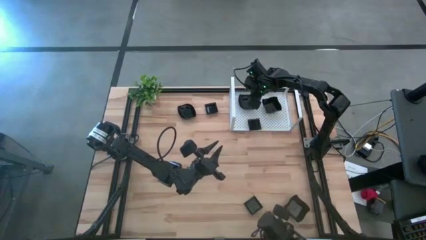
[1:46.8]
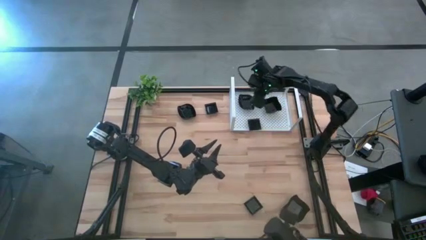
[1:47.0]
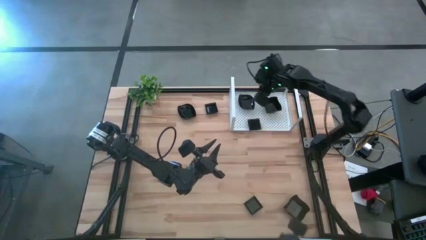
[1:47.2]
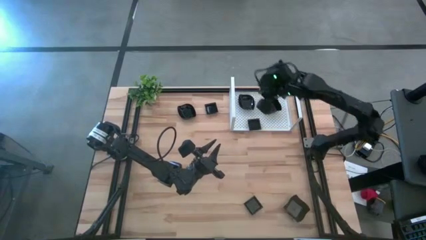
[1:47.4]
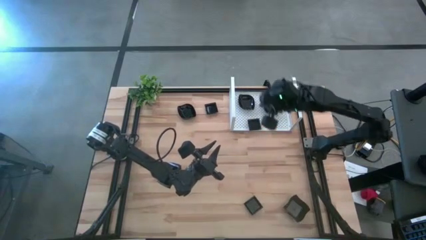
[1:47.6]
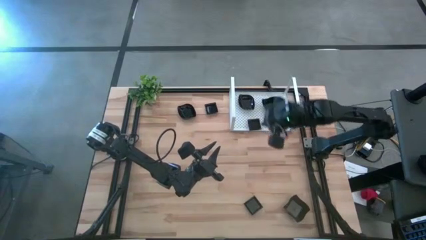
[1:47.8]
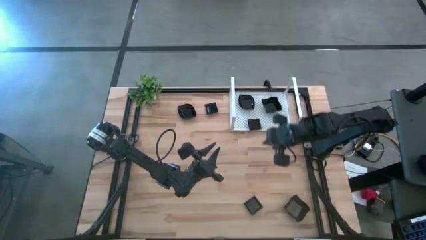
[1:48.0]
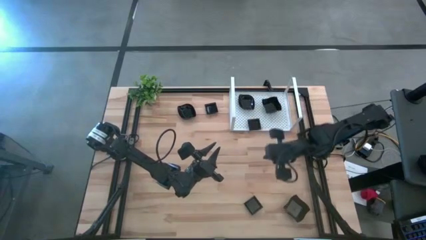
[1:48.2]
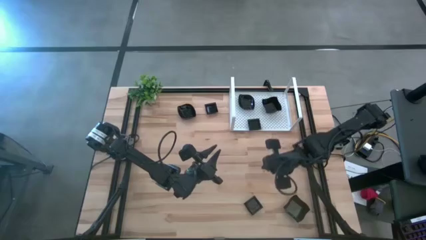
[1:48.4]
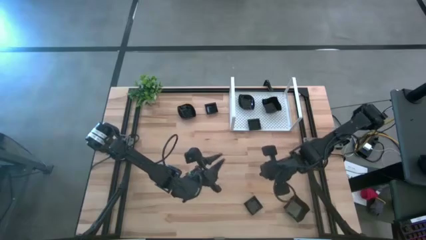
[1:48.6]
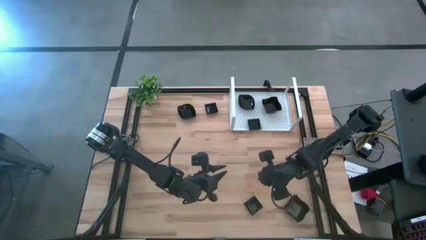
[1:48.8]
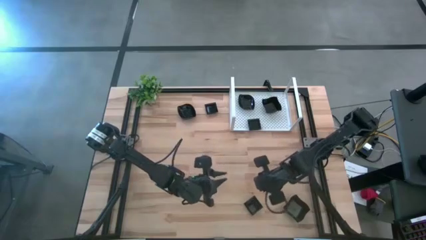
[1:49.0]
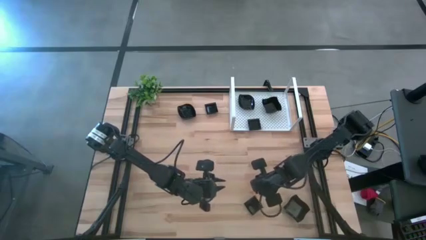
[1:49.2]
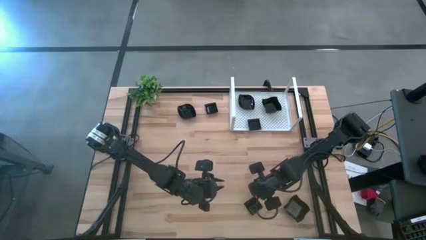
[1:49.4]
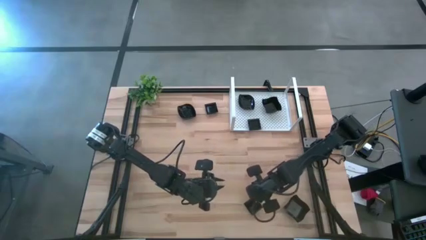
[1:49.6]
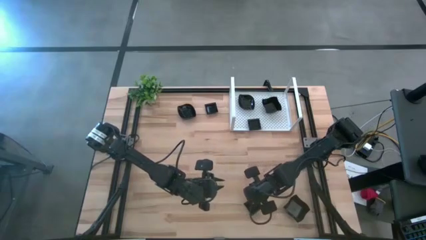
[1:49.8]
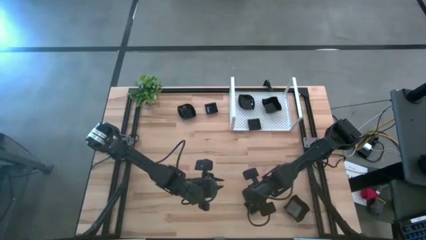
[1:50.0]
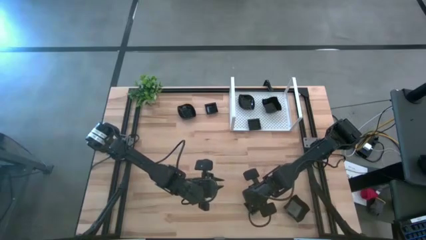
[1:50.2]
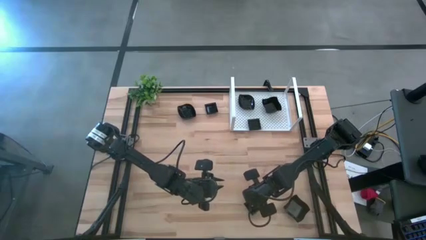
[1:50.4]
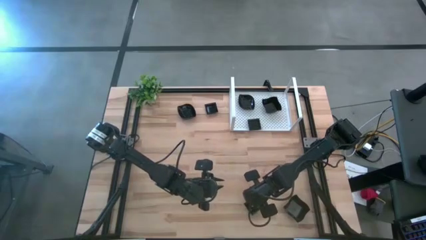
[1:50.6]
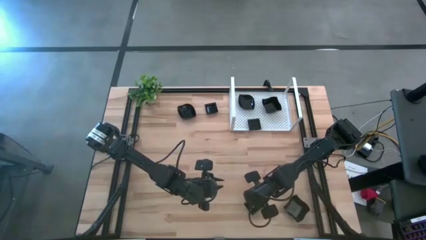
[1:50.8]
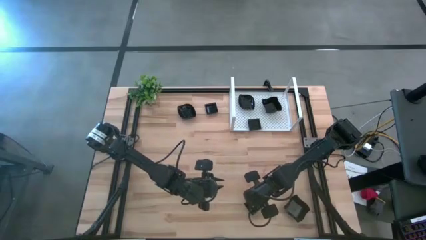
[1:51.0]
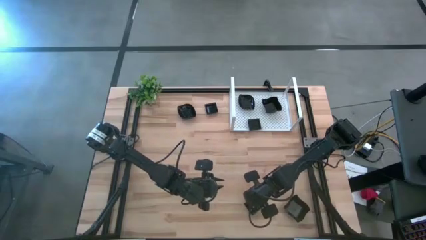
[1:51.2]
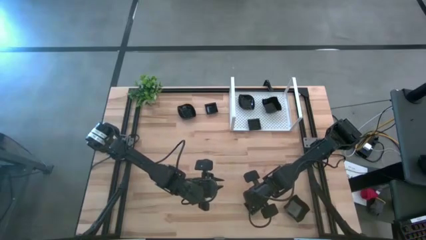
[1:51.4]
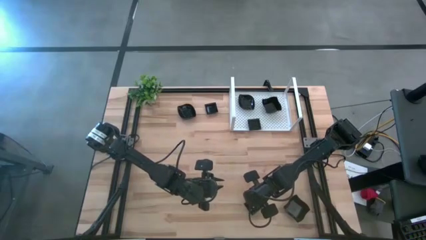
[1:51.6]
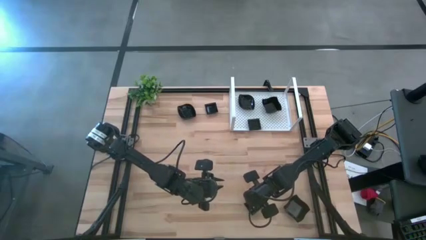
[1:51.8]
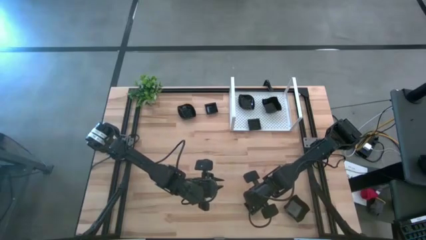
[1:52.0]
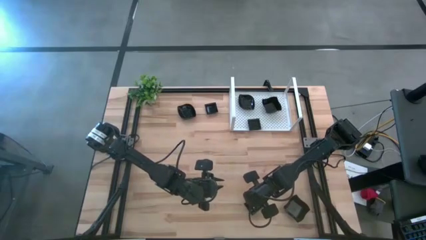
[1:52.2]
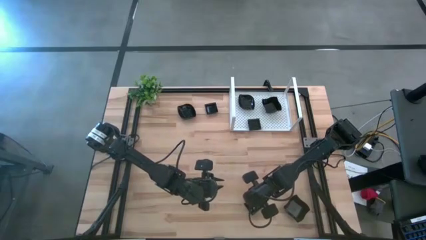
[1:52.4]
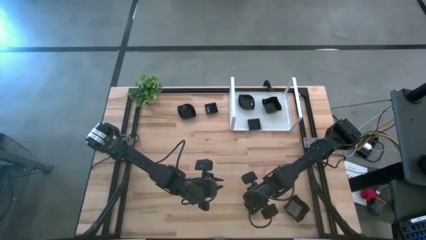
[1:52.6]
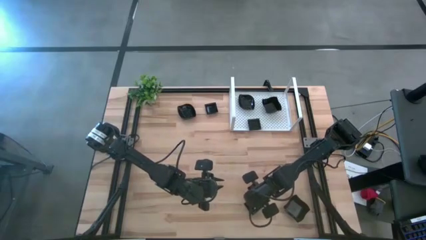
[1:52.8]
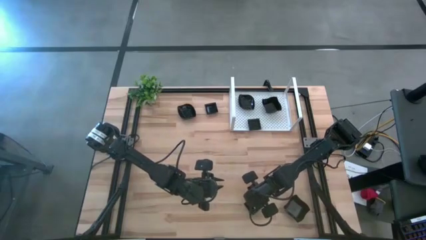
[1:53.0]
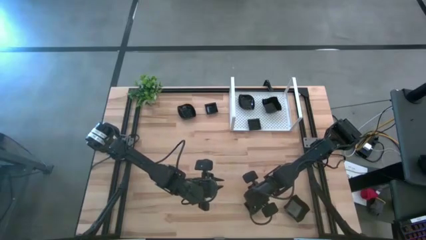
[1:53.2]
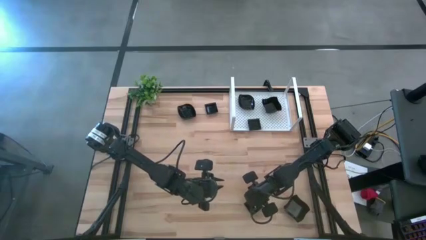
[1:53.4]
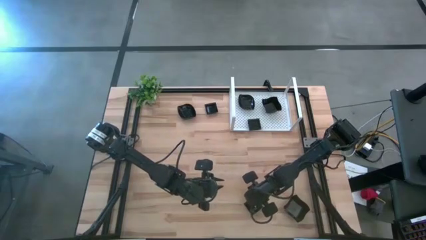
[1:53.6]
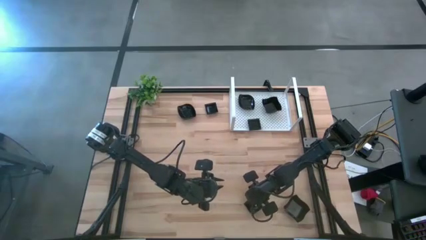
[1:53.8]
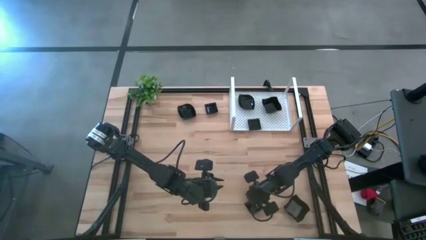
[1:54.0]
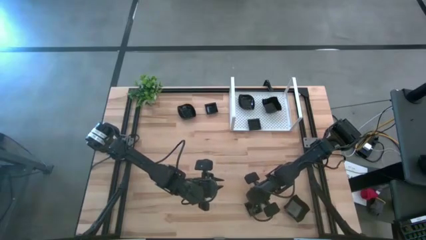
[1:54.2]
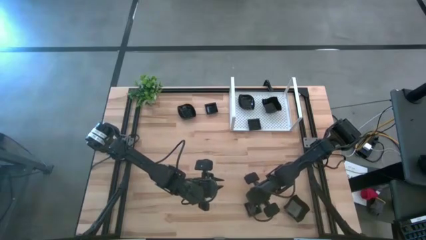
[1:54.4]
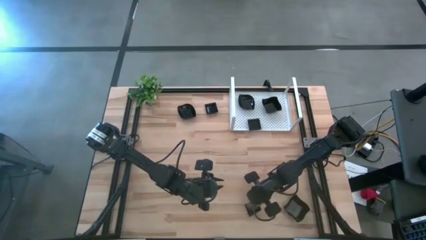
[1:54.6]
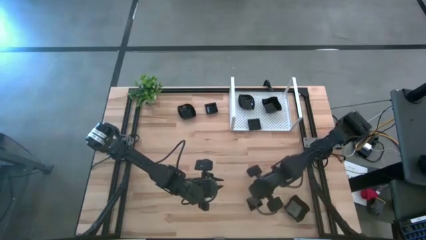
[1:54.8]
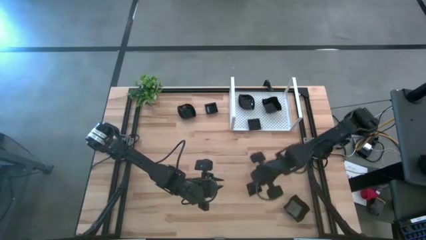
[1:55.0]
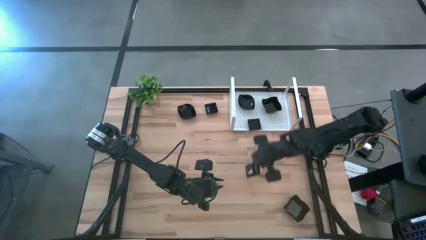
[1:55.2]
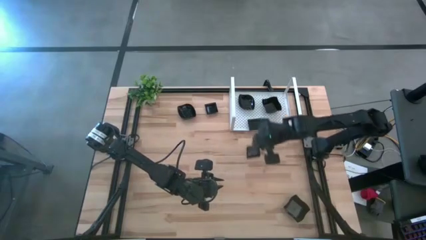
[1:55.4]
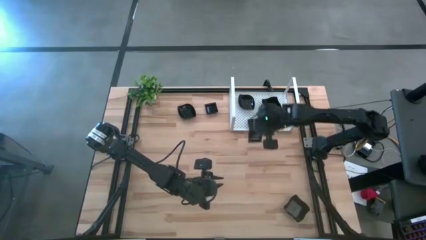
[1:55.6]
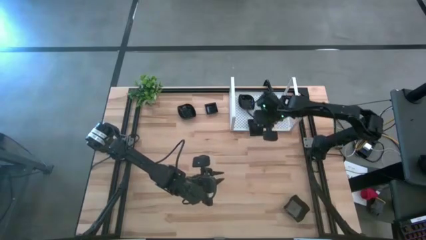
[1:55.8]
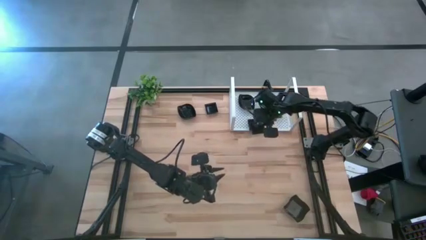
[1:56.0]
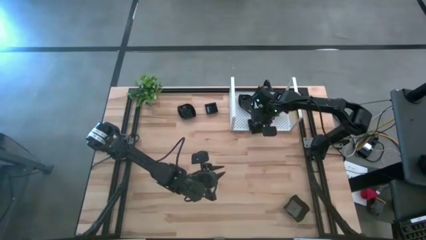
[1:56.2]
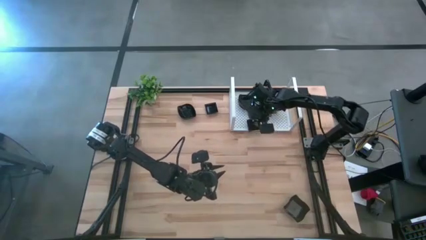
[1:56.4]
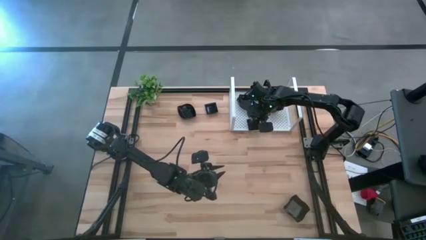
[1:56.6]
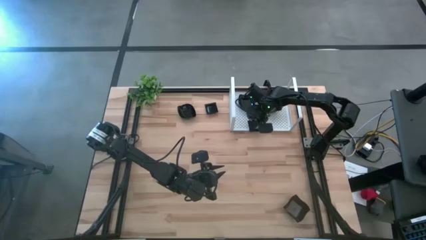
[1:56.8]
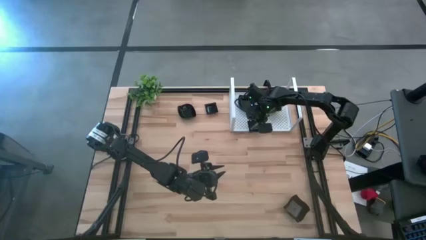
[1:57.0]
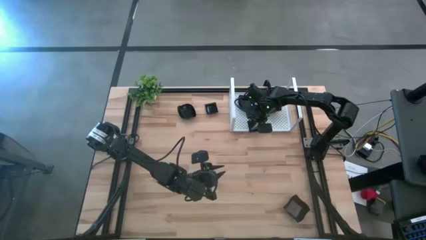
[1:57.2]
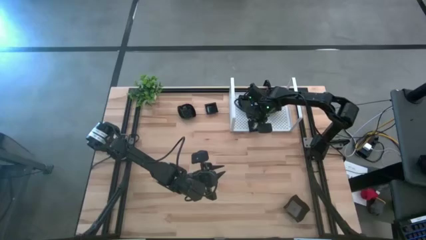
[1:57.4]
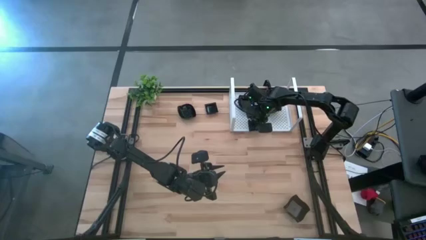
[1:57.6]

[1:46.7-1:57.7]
Task: Pick & Place Mini shaped plates
Stack the square plate on top of the other square plates on the shelf

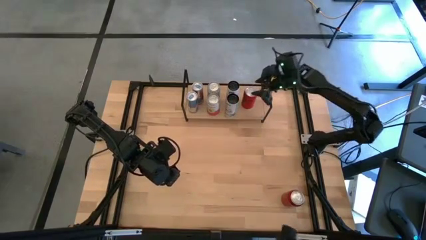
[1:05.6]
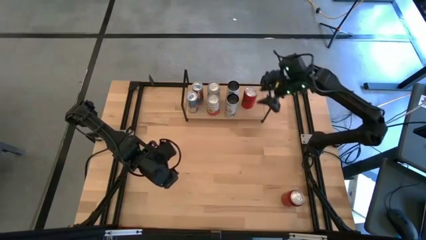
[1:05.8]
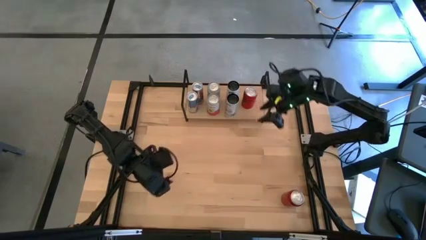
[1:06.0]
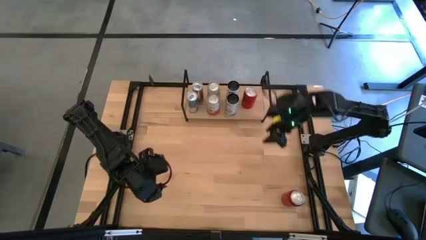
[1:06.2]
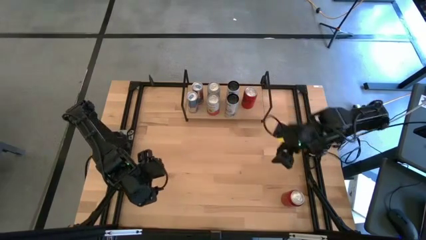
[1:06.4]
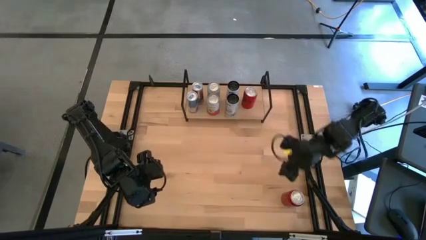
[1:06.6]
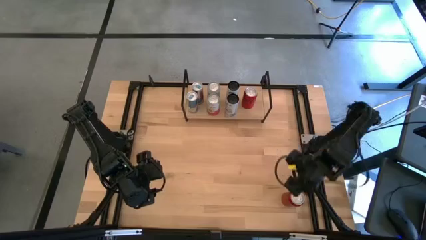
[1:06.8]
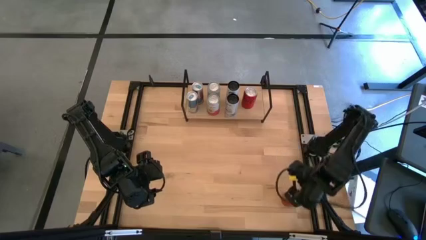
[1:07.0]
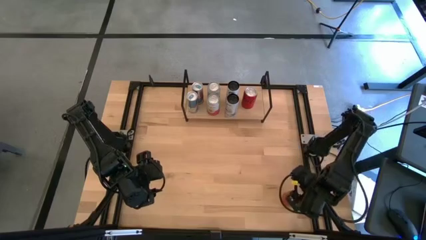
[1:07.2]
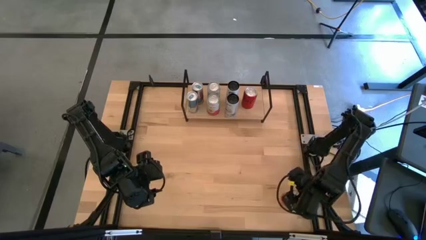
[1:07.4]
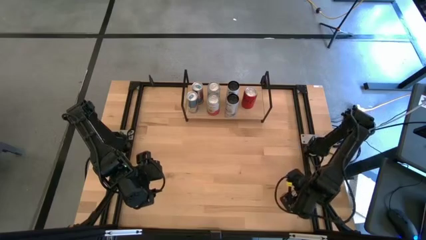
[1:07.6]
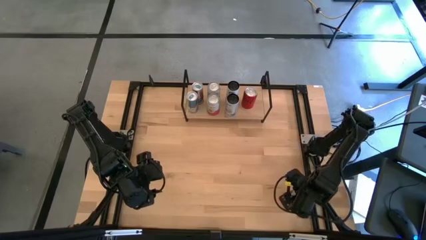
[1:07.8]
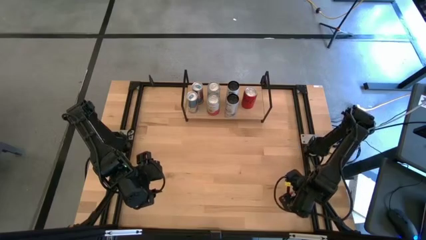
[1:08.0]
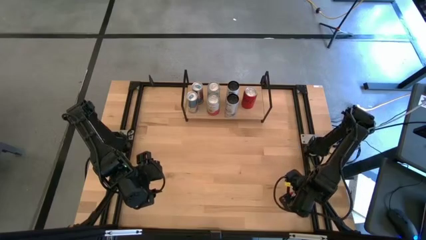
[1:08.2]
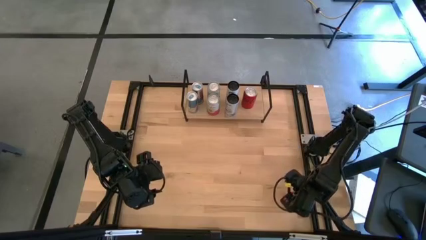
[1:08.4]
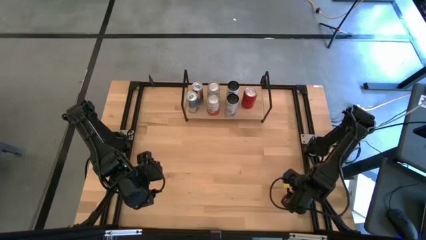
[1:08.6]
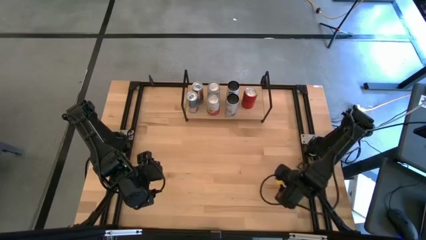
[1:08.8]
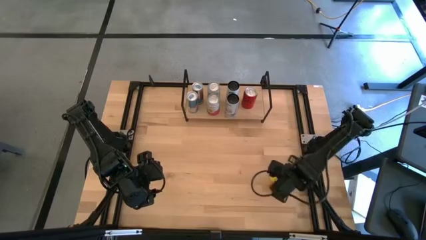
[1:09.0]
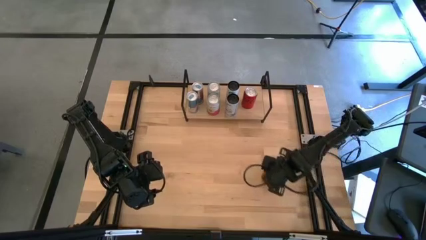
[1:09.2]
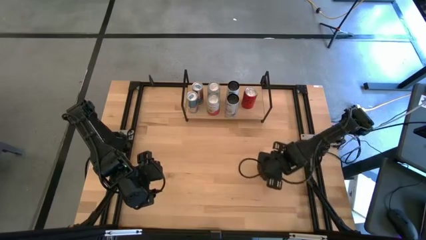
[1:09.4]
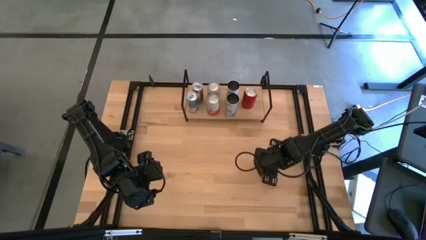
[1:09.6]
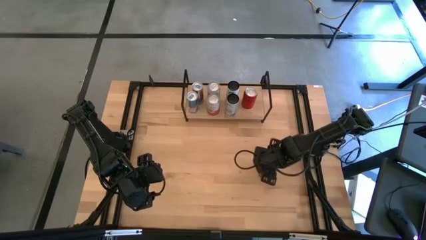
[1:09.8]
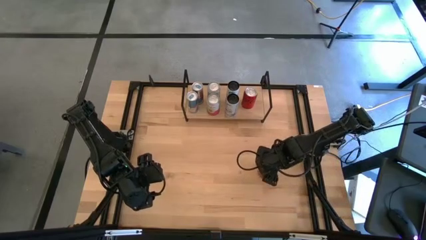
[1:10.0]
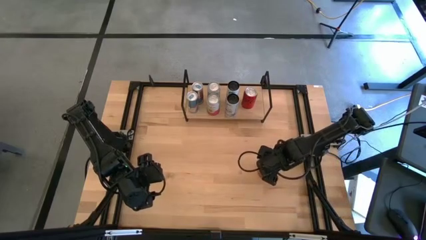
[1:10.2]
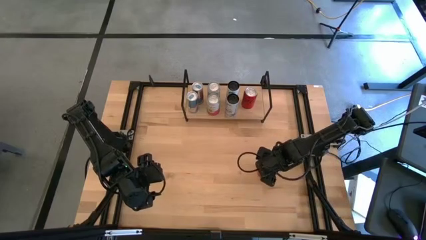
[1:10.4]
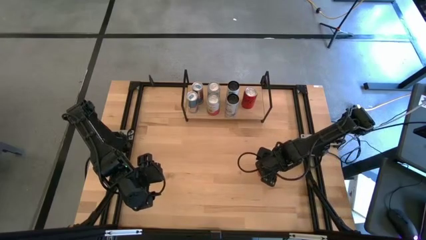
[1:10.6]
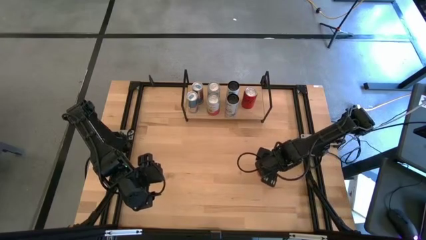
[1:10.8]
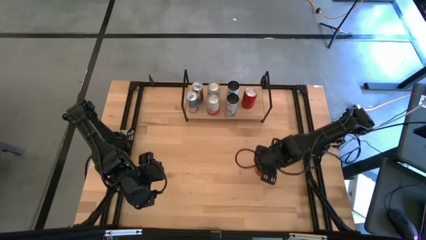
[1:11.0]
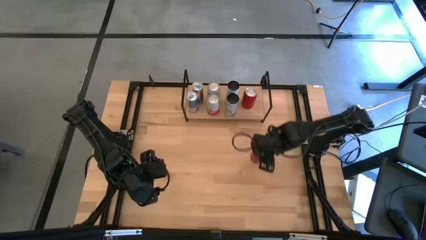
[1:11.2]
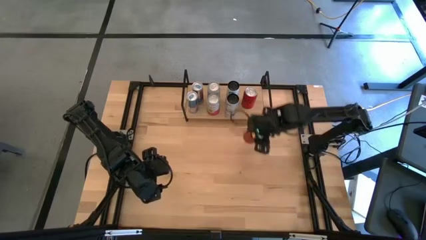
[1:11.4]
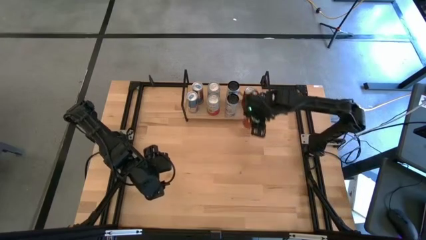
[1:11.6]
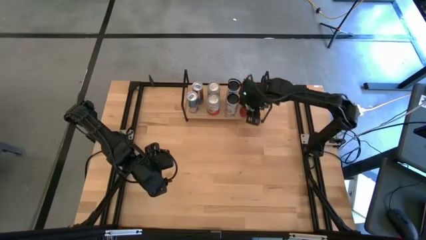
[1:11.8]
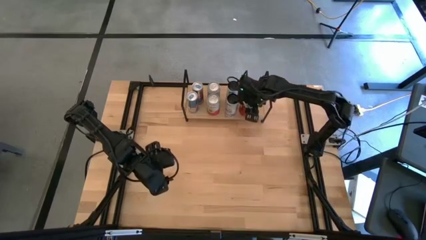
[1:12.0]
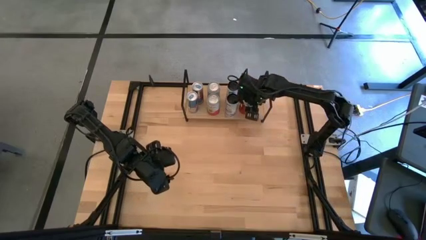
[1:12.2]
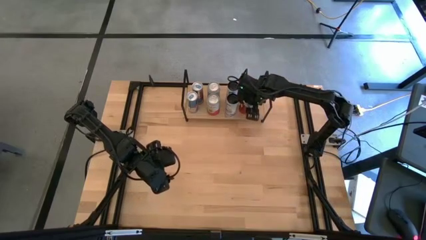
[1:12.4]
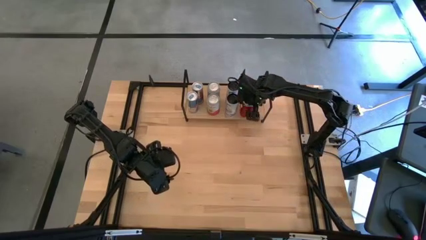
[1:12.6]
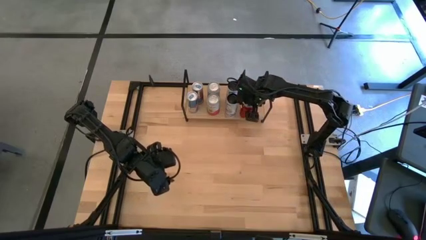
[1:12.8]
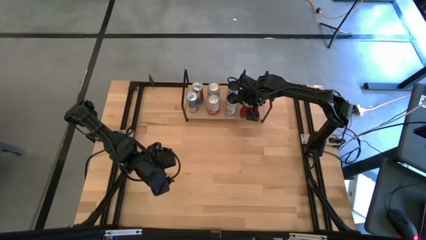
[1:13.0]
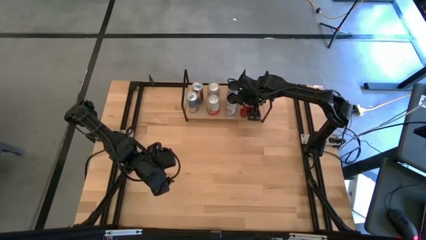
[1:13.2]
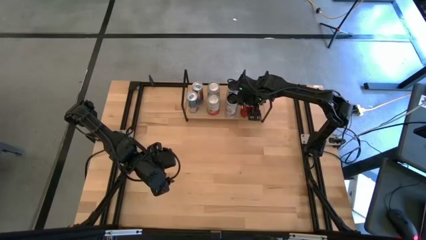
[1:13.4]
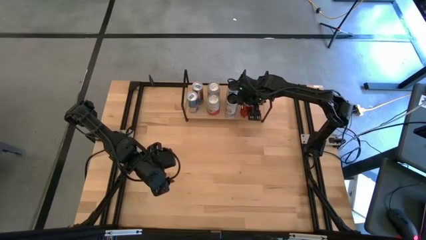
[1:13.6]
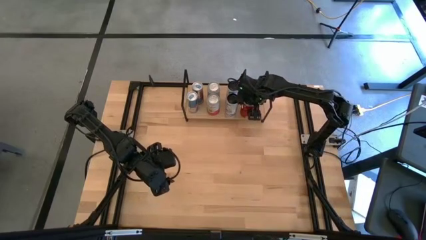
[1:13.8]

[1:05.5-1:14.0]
Task: Place canned beverage on shelf
Put the red soda can on the shelf aligned with the other red soda can
